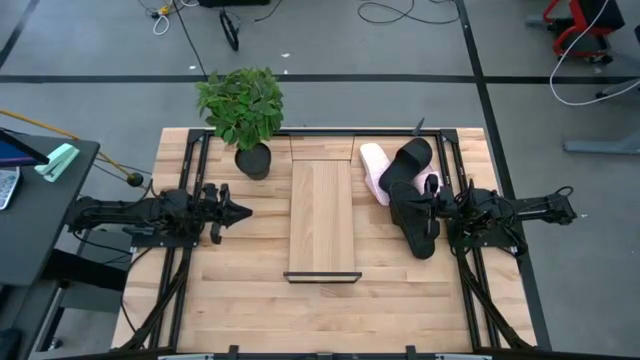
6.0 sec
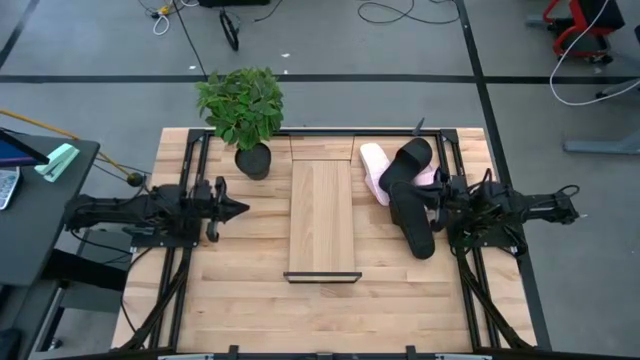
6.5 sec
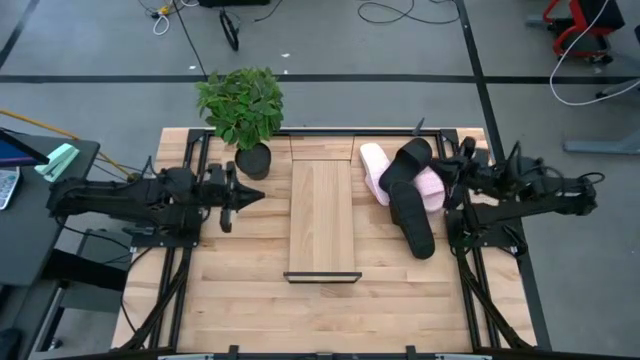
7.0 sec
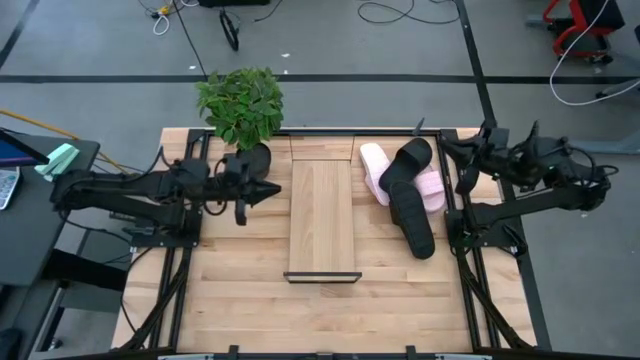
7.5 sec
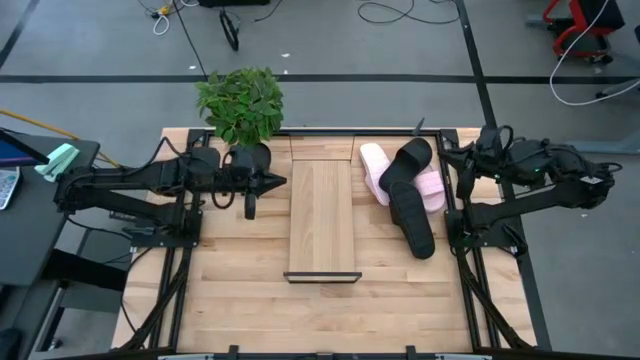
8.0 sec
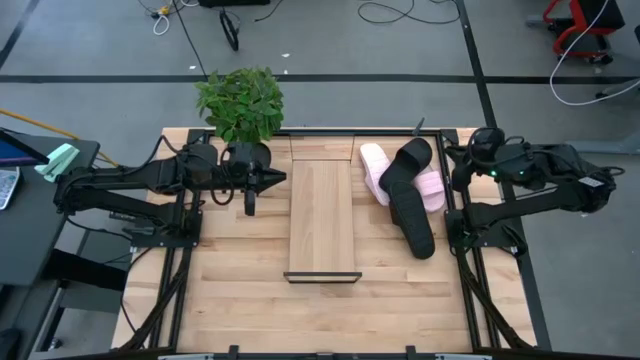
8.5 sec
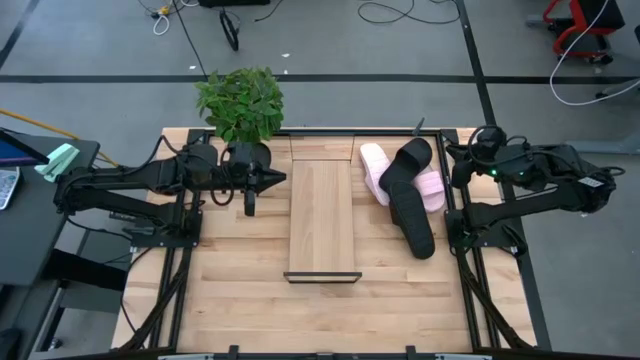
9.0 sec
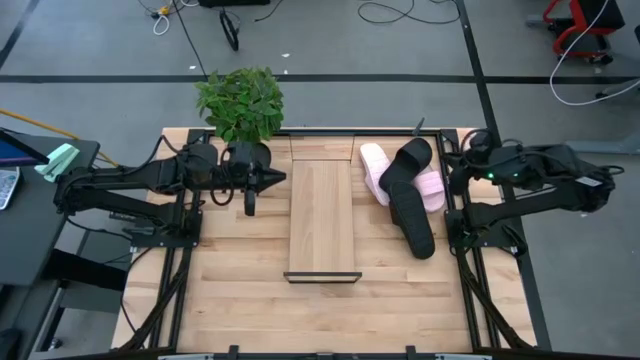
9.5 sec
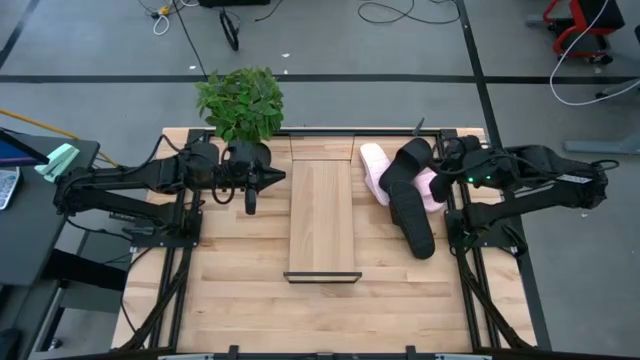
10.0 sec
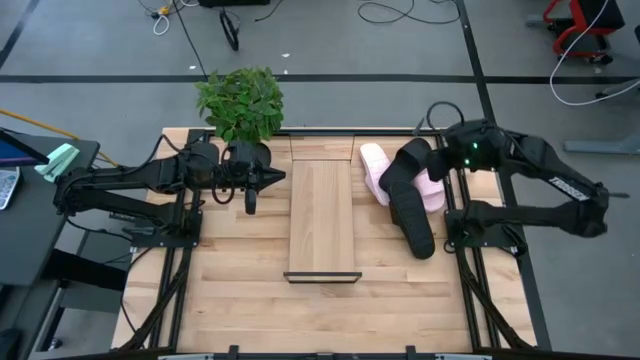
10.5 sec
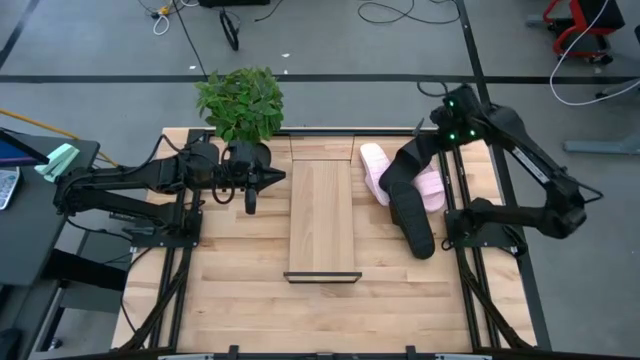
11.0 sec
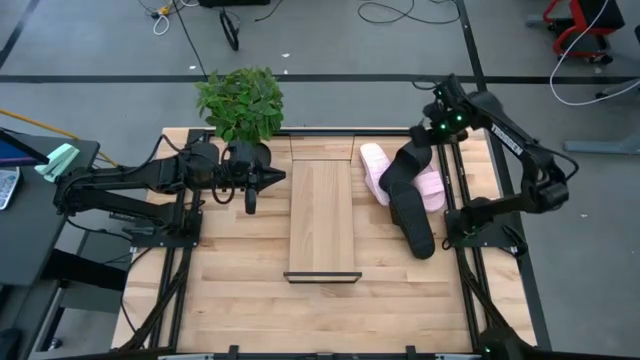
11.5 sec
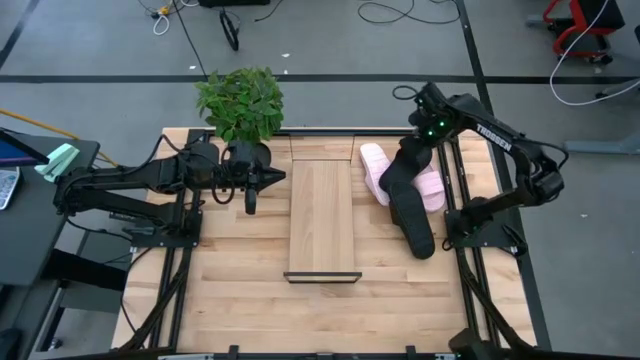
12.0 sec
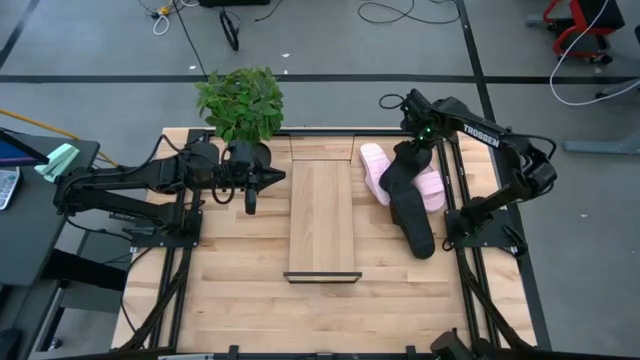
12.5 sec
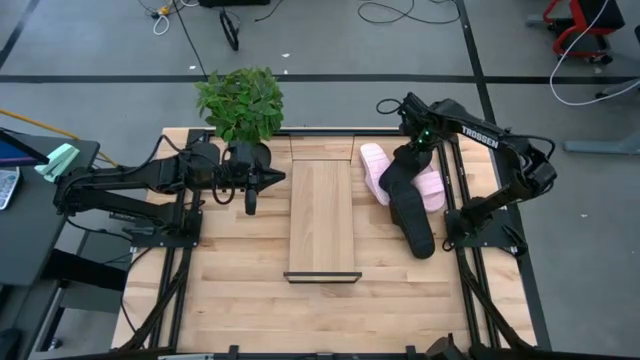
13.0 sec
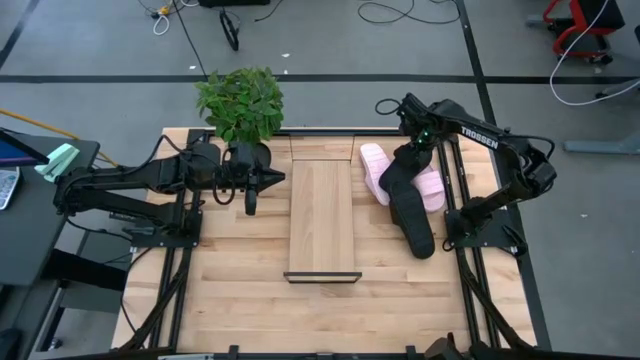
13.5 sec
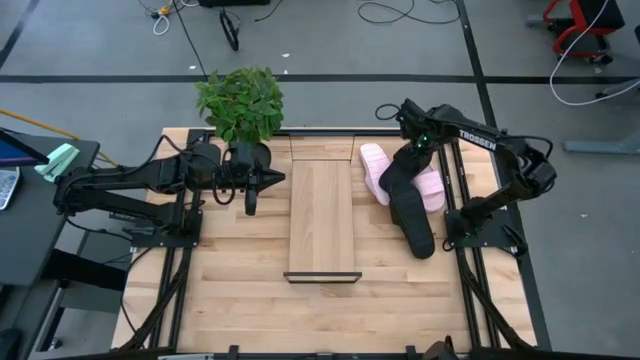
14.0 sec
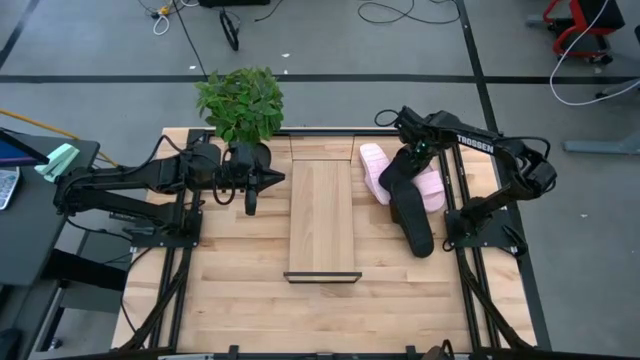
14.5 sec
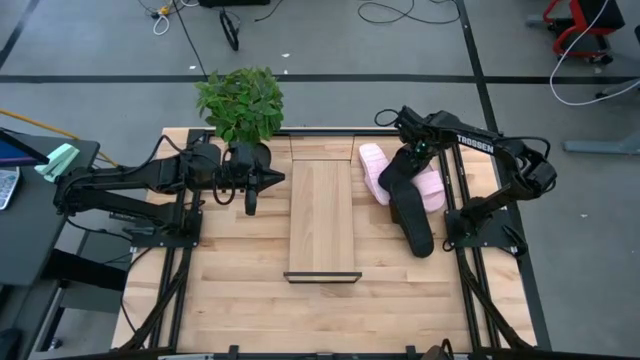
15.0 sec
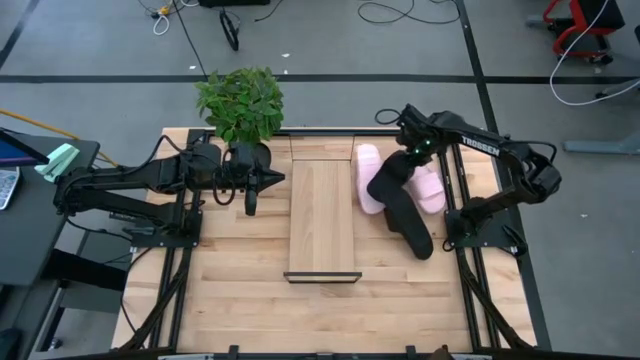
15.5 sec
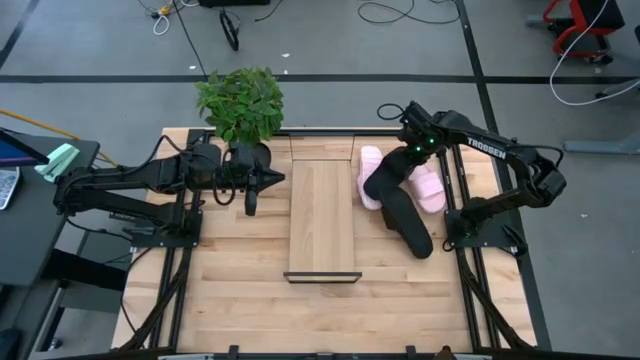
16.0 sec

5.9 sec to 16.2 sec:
Task: Pick and place slides into the shelf
Put the black slipper on the shelf

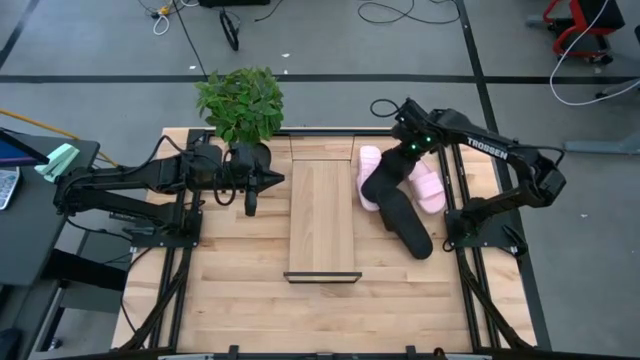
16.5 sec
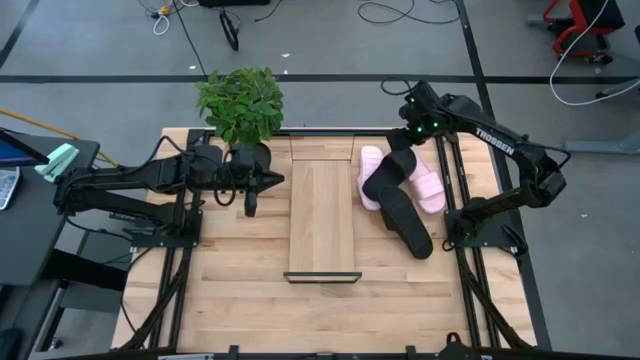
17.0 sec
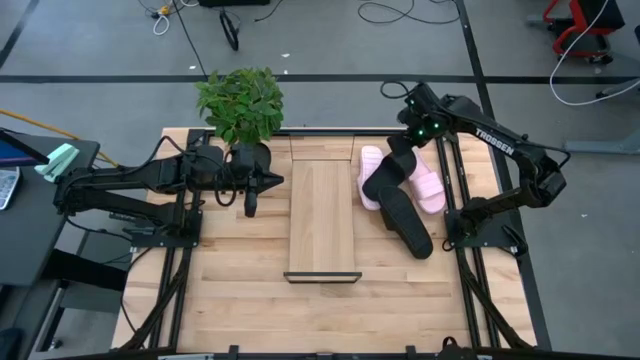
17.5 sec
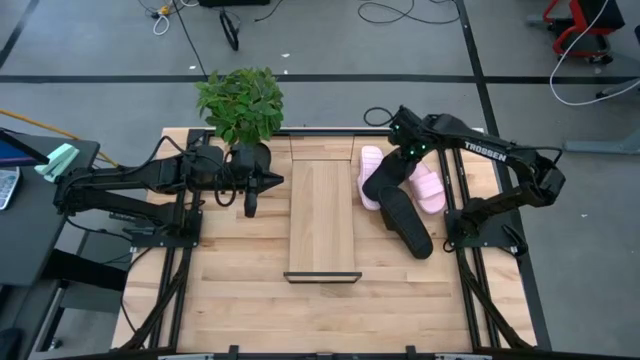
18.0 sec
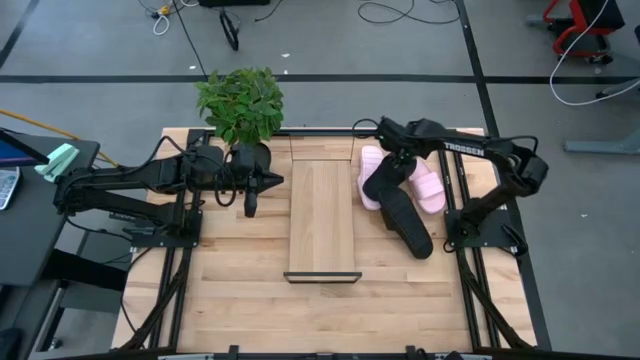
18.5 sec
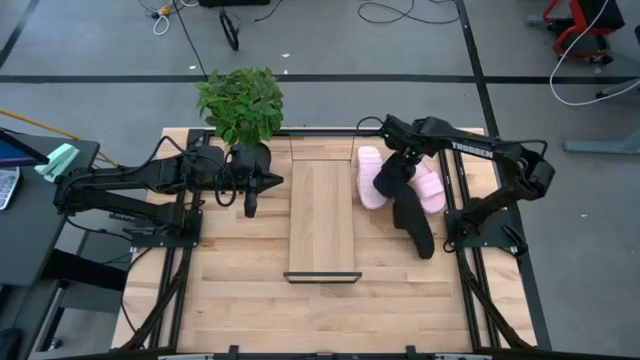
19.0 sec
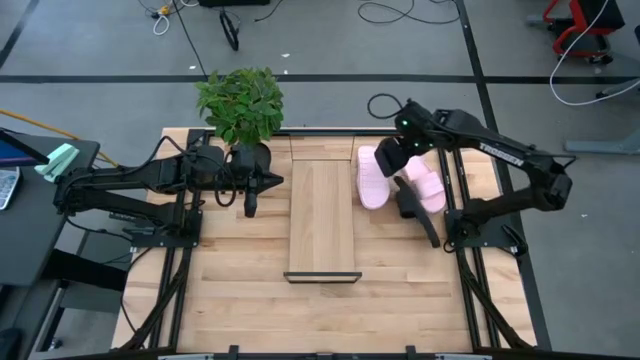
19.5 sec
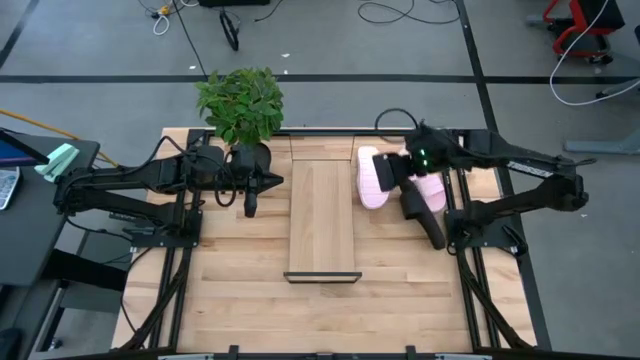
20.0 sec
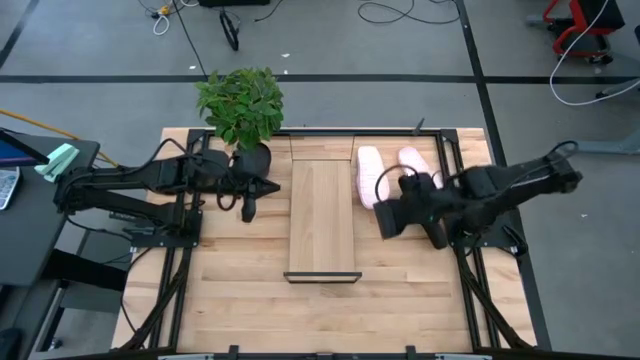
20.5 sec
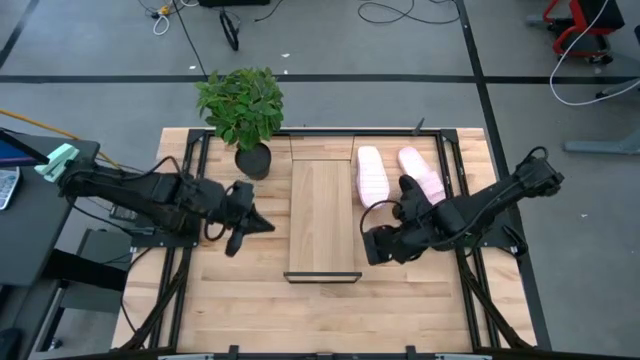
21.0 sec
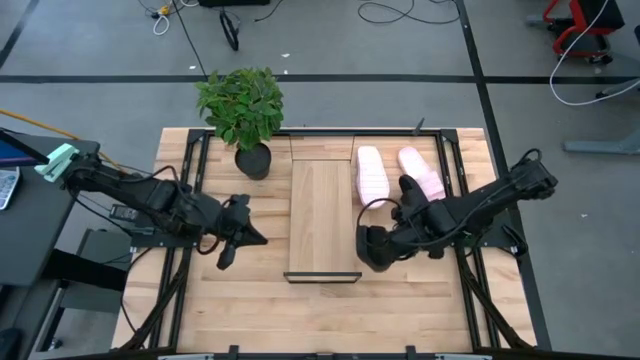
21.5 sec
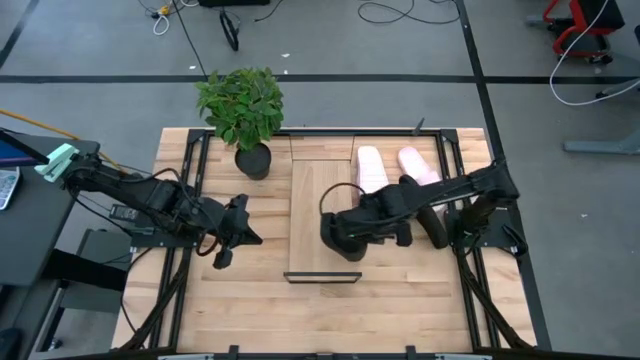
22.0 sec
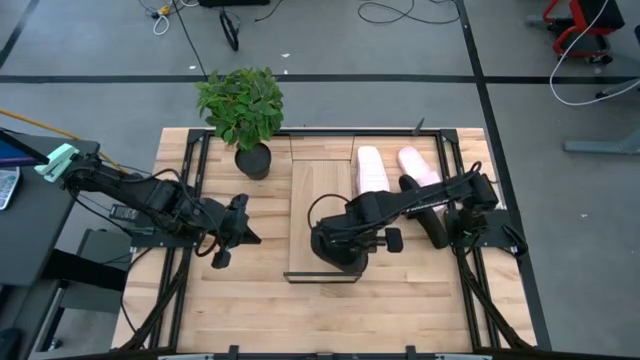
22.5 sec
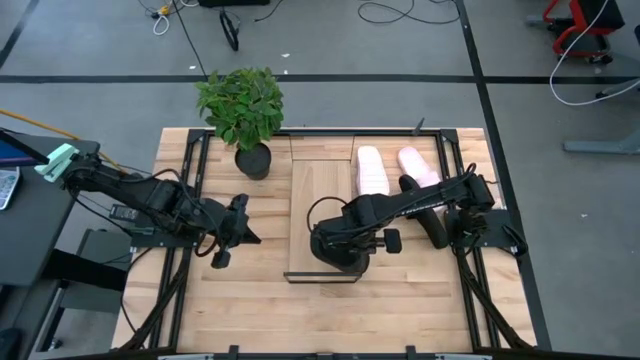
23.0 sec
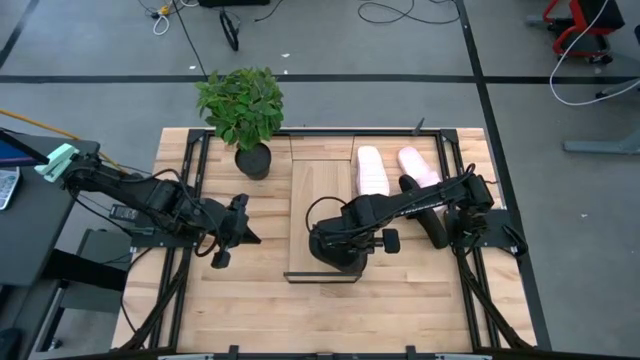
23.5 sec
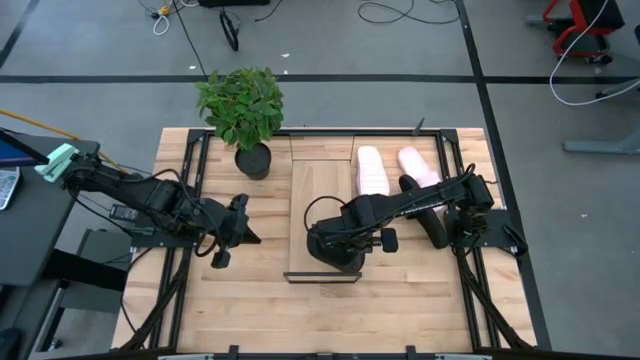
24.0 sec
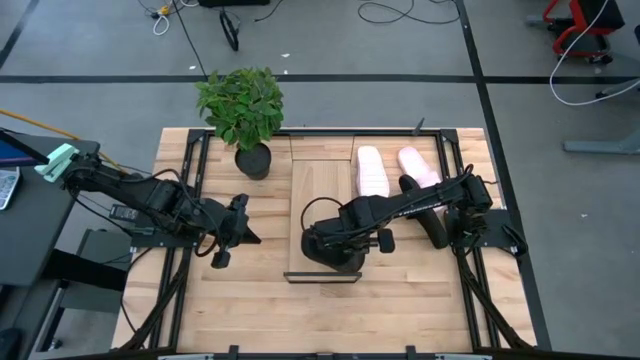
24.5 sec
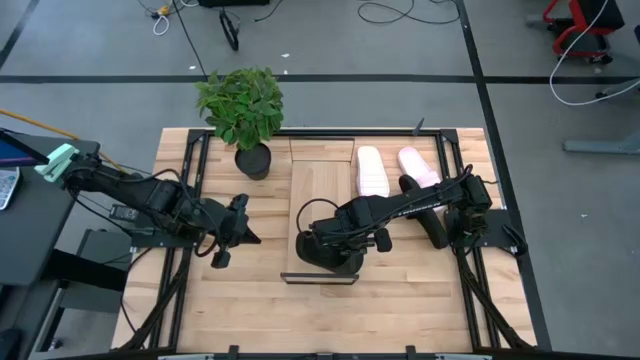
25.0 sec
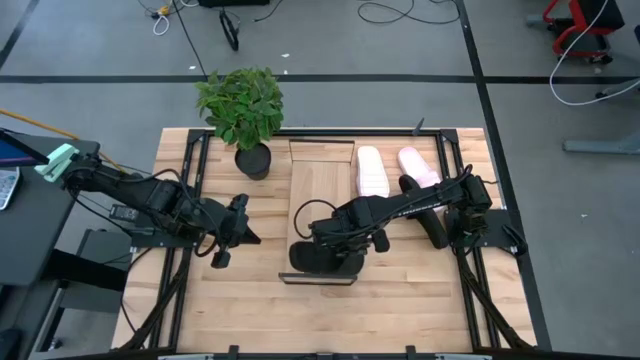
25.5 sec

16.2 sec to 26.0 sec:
Put the black slipper on the shelf

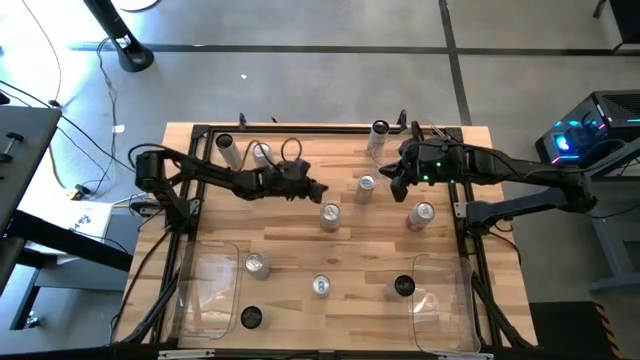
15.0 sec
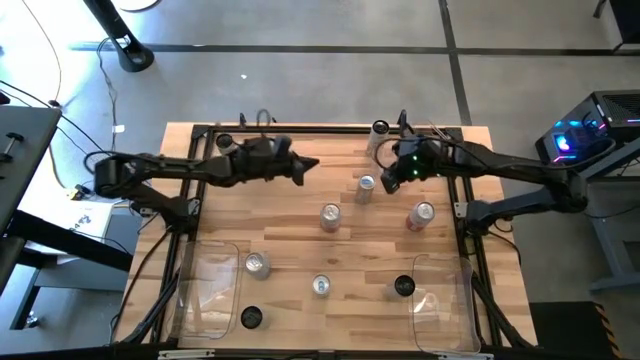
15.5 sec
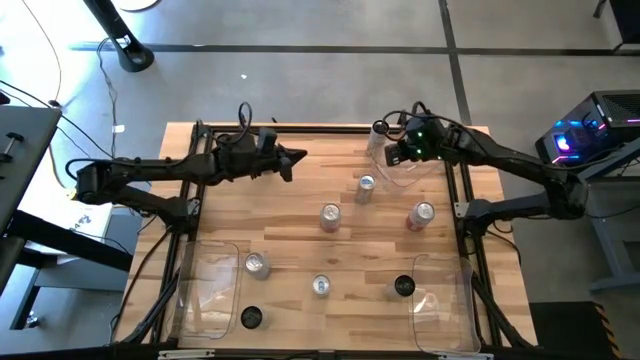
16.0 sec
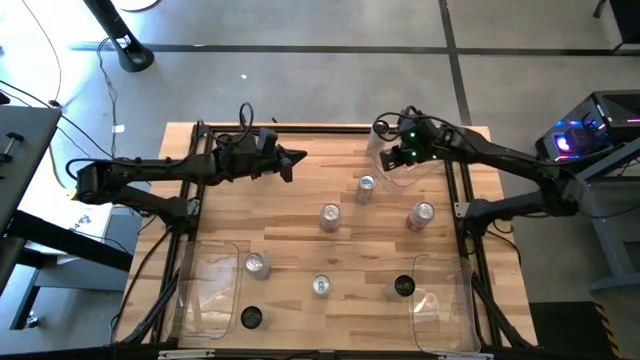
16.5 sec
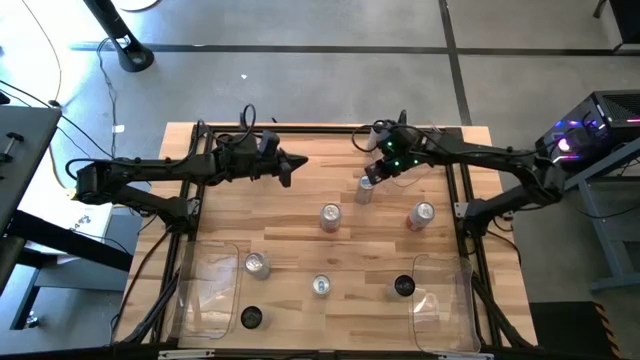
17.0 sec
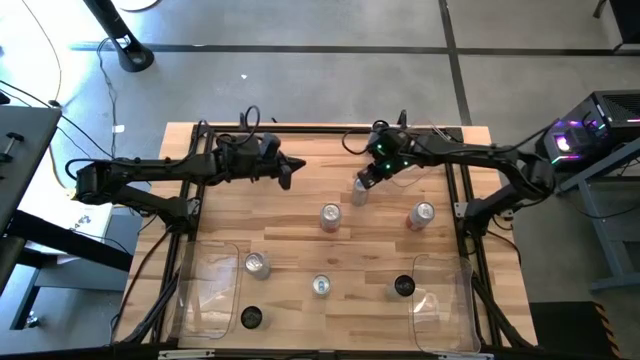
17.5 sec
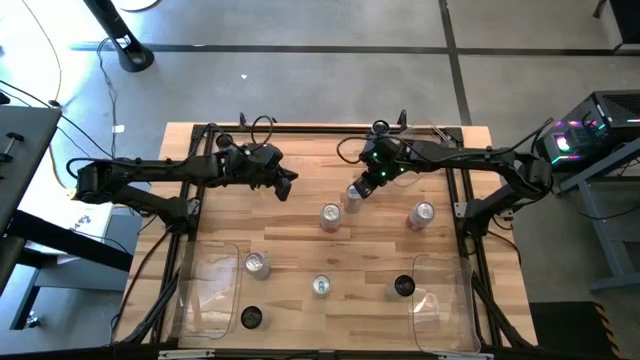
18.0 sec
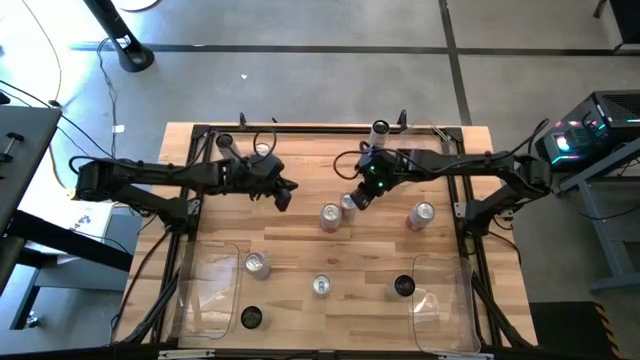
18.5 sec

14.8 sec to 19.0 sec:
Task: Sort soda cans
Move the top blue soda can to the center of the table
